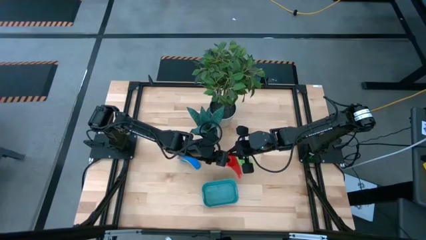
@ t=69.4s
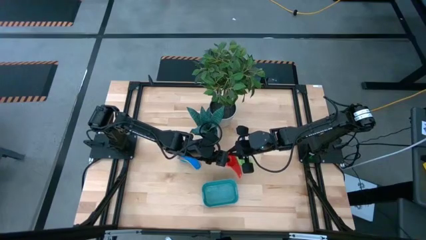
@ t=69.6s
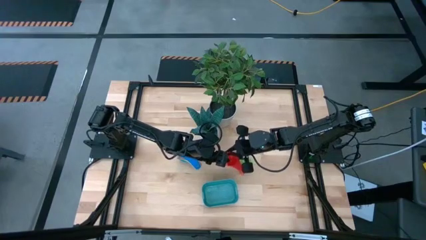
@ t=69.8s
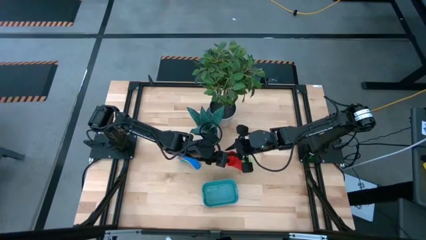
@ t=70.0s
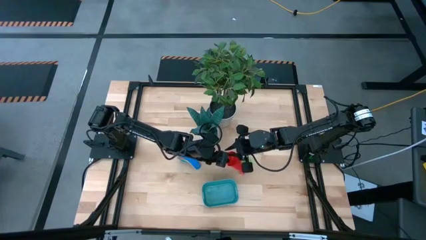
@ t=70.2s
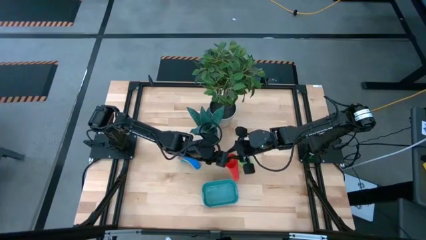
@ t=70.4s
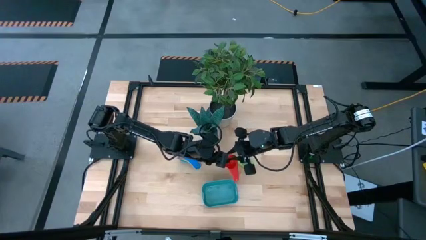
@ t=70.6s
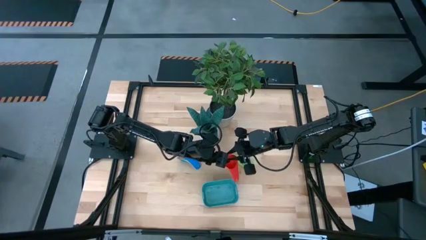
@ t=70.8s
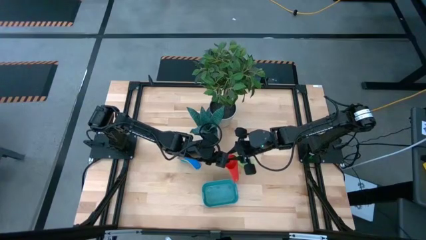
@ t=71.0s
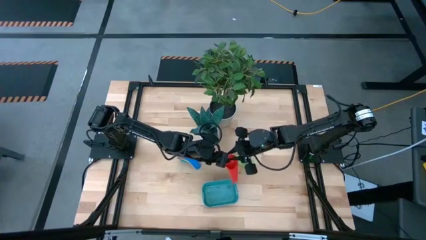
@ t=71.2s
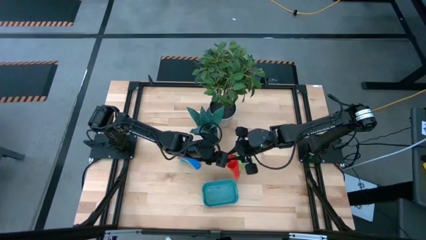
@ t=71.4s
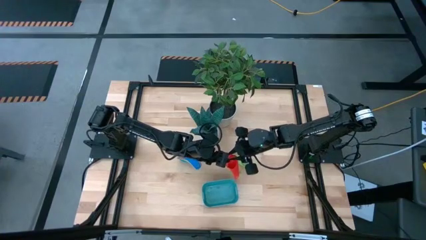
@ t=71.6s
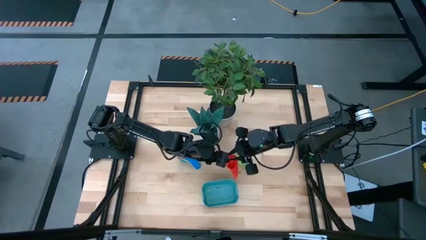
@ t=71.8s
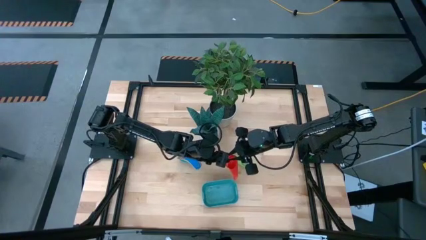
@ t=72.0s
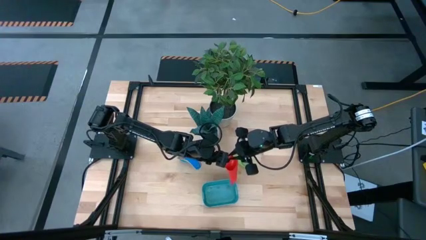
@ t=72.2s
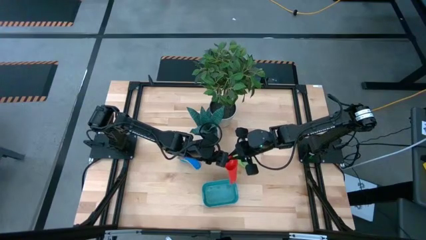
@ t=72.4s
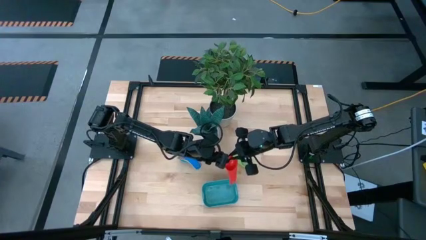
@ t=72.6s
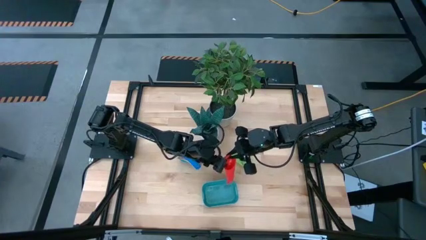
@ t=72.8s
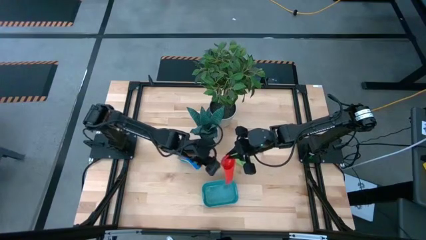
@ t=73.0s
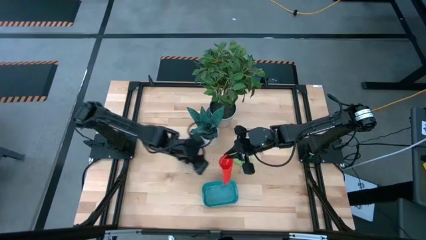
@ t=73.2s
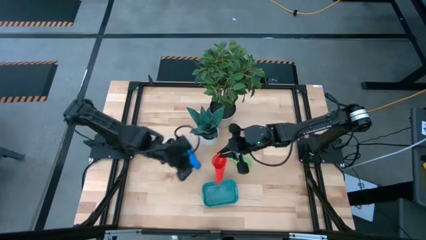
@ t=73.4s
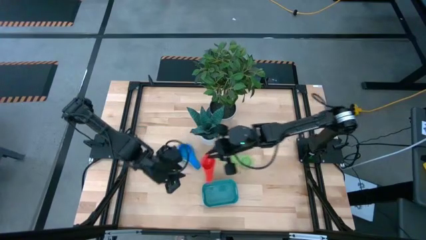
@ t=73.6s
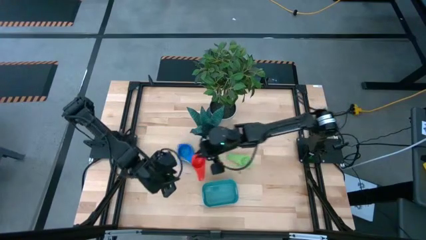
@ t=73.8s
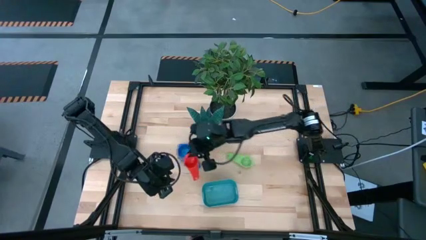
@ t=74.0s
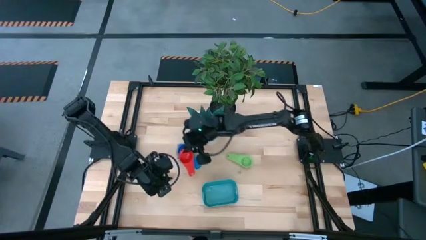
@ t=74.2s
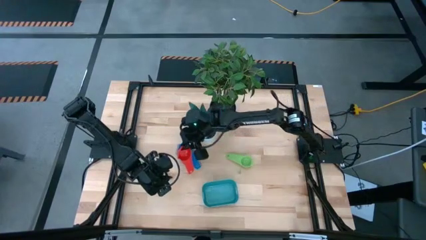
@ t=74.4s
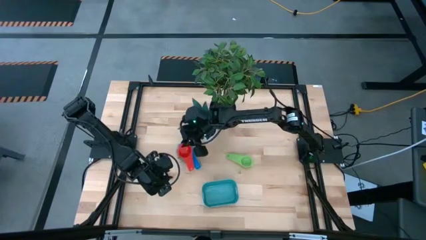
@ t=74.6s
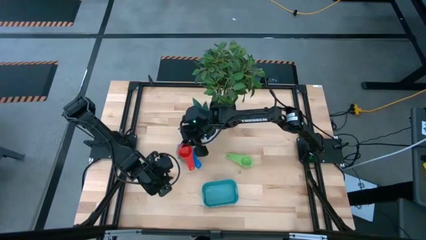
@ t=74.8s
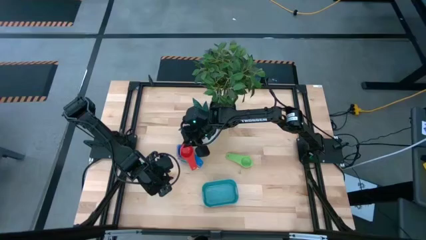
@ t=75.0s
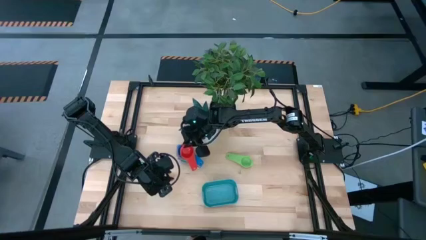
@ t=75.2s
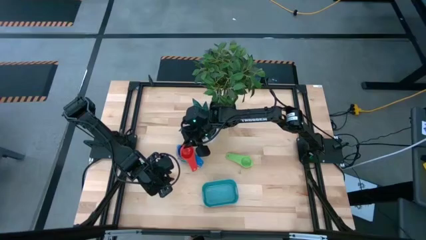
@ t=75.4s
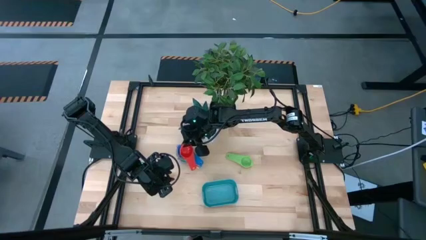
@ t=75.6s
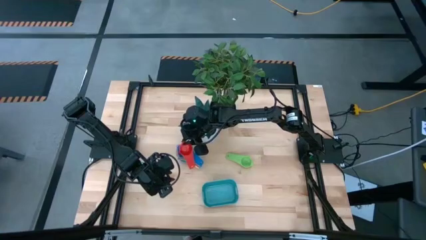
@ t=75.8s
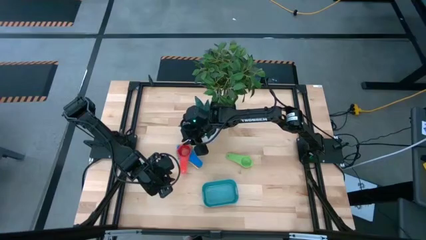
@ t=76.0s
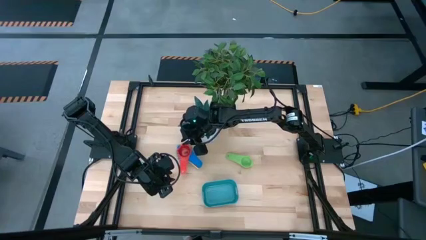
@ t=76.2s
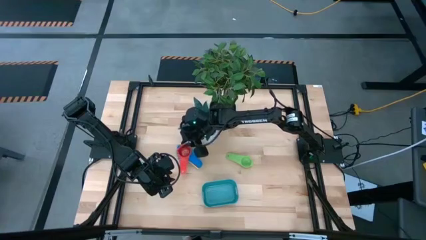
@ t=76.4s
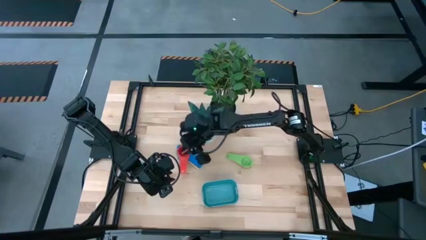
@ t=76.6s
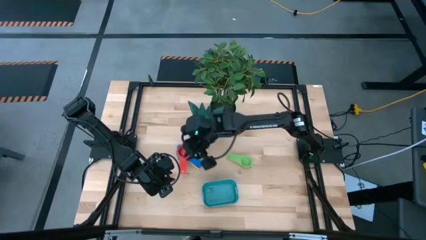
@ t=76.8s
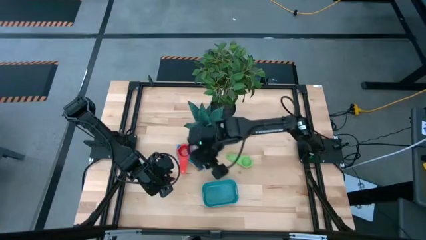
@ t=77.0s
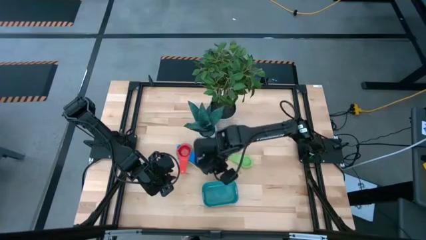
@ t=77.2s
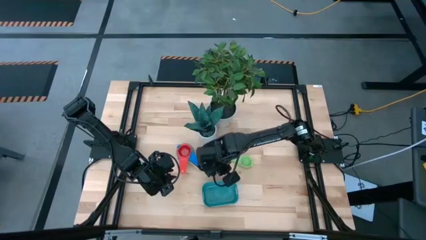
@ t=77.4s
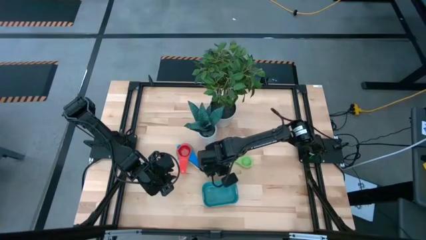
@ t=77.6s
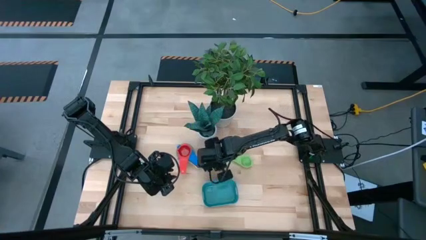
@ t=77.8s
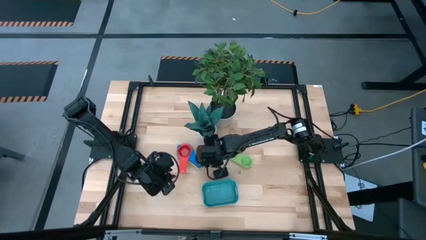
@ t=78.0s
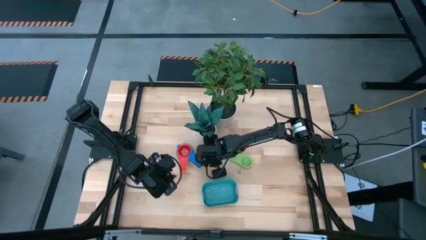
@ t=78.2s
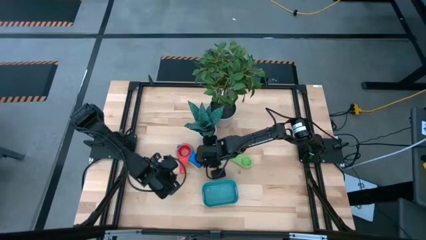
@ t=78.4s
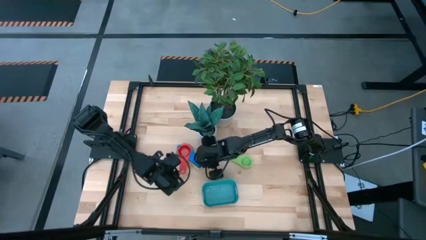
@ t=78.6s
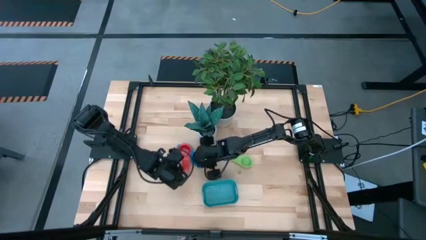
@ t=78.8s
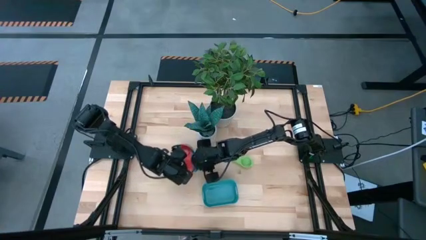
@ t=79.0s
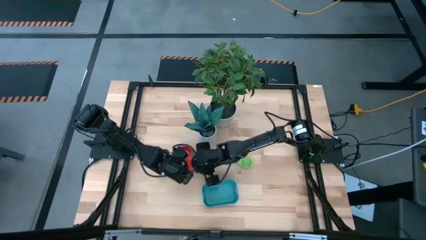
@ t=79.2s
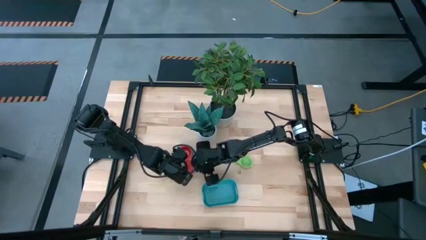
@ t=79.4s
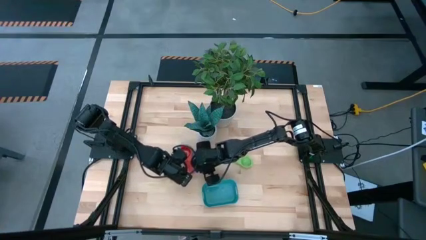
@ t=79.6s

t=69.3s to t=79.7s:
Task: Nest measuring cups in basket
Stack the red measuring cup on top of the blue measuring cup
